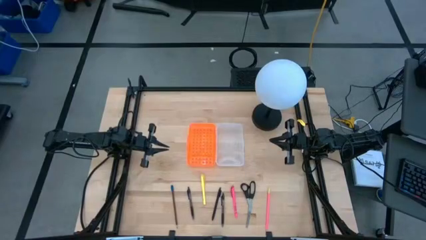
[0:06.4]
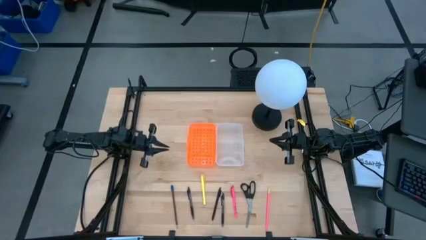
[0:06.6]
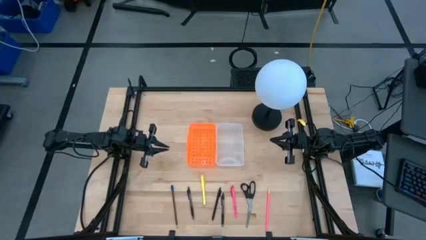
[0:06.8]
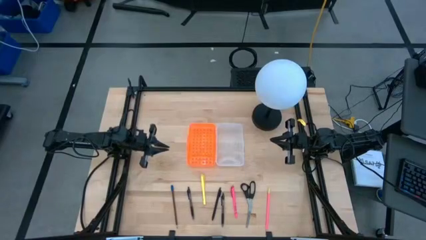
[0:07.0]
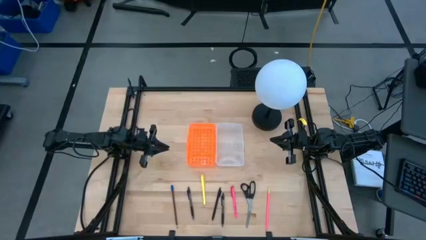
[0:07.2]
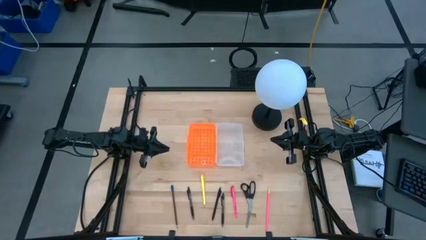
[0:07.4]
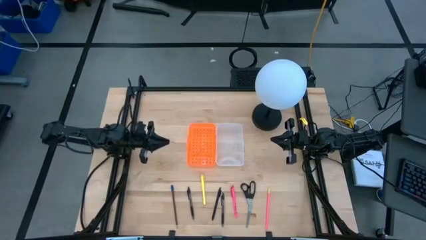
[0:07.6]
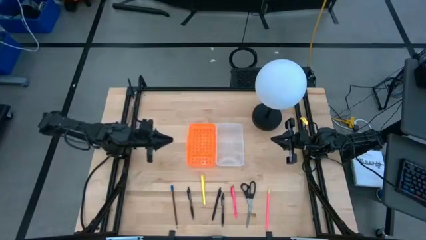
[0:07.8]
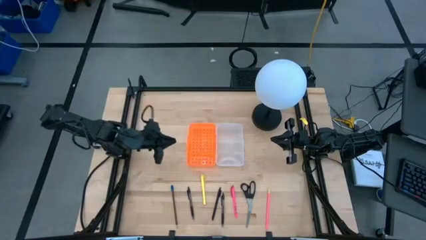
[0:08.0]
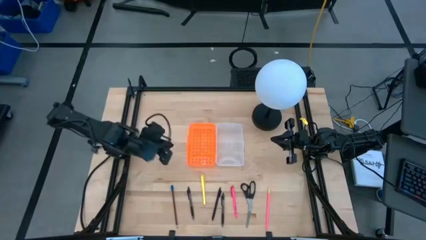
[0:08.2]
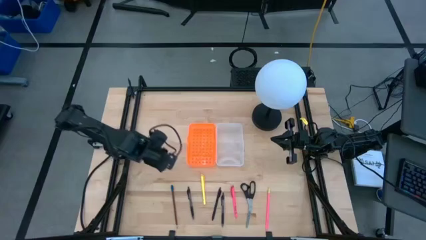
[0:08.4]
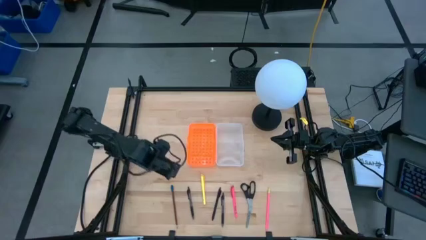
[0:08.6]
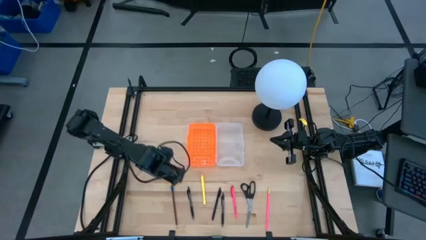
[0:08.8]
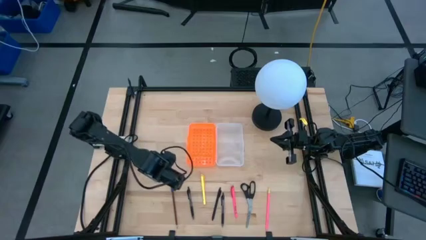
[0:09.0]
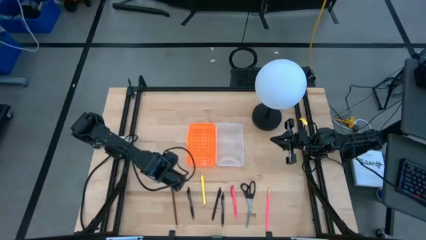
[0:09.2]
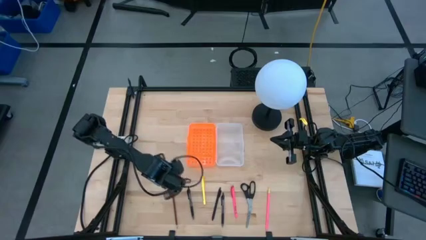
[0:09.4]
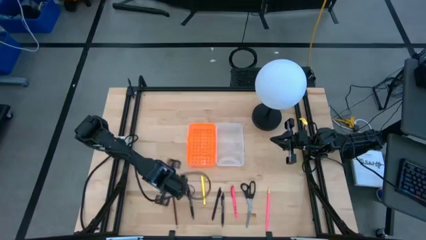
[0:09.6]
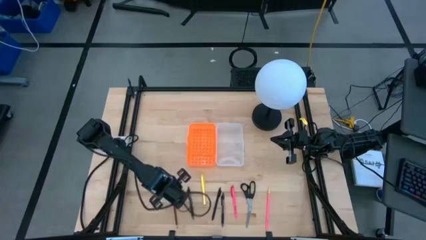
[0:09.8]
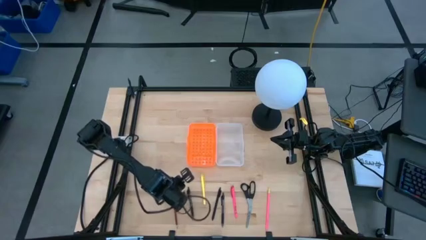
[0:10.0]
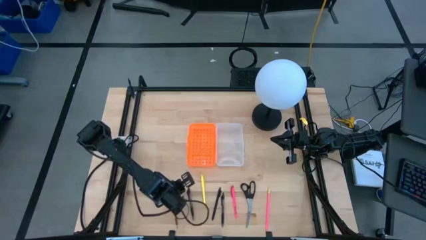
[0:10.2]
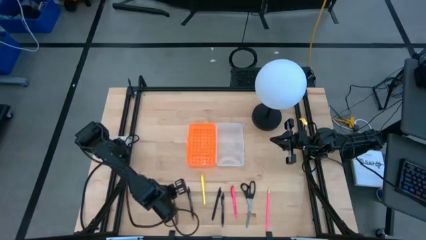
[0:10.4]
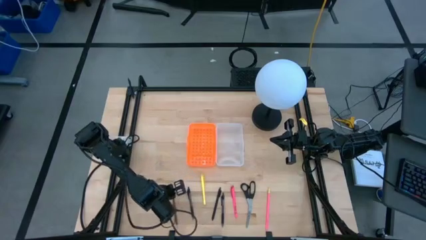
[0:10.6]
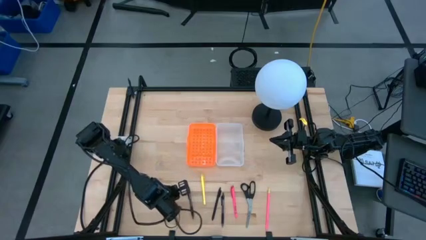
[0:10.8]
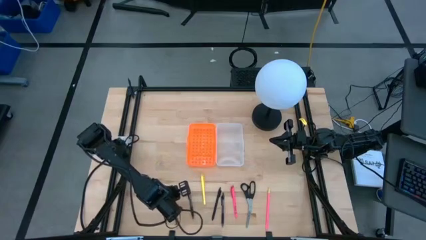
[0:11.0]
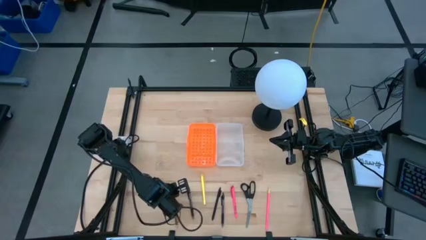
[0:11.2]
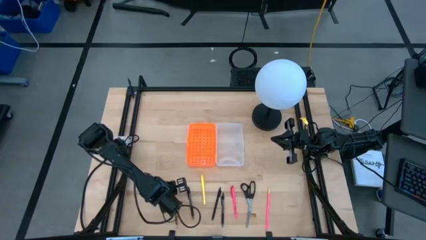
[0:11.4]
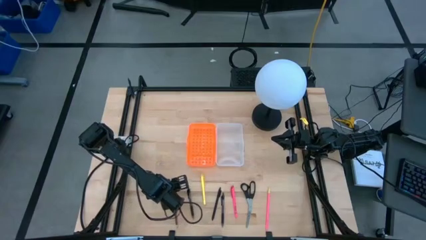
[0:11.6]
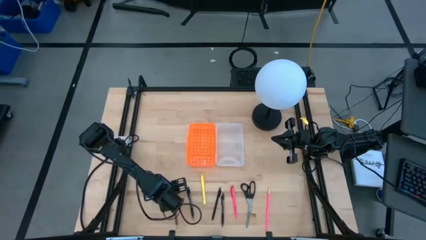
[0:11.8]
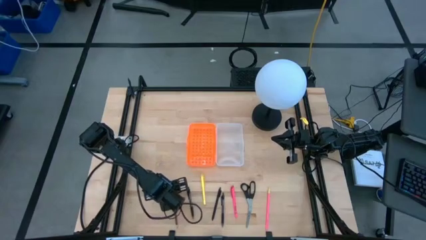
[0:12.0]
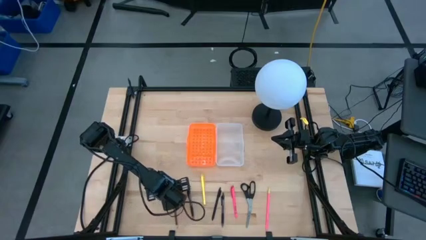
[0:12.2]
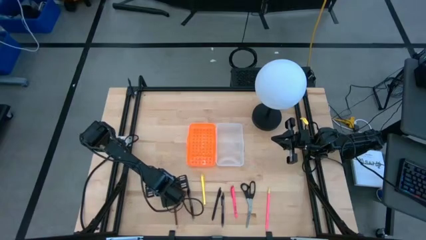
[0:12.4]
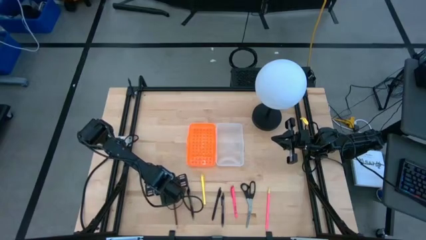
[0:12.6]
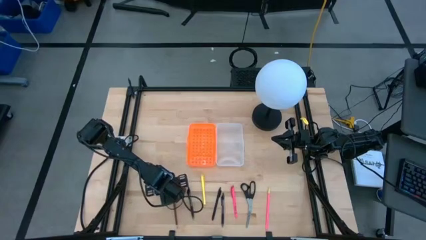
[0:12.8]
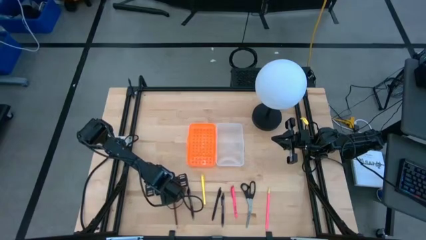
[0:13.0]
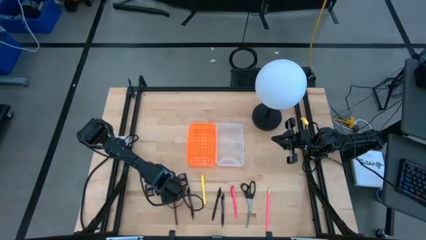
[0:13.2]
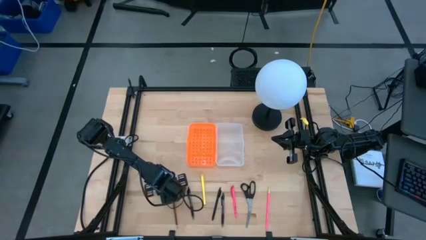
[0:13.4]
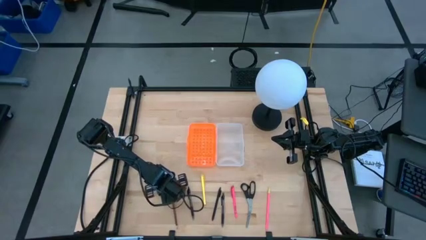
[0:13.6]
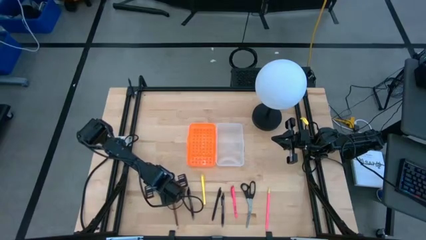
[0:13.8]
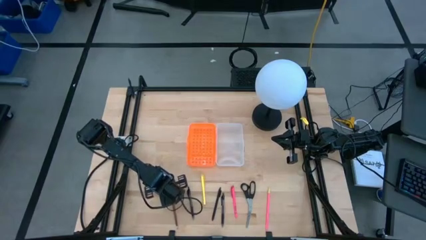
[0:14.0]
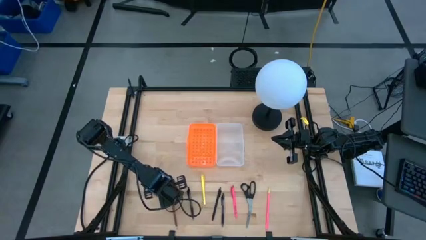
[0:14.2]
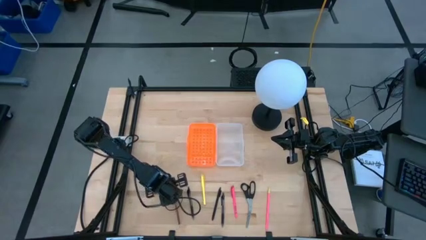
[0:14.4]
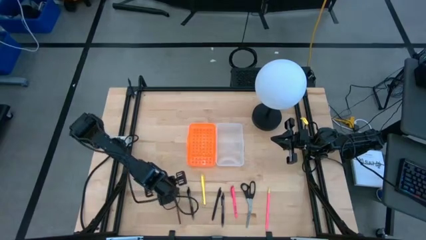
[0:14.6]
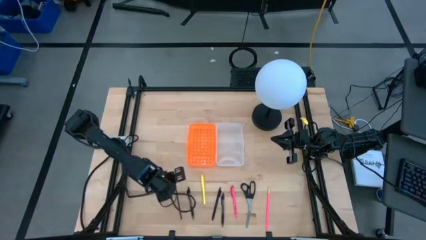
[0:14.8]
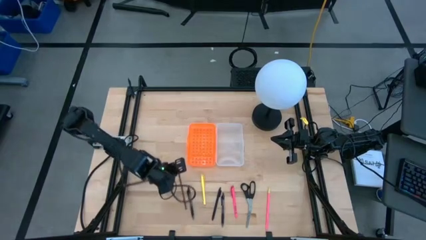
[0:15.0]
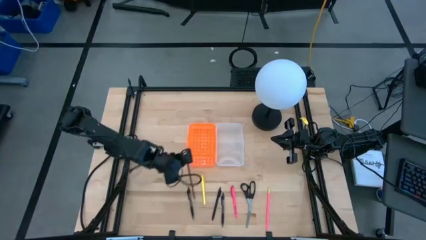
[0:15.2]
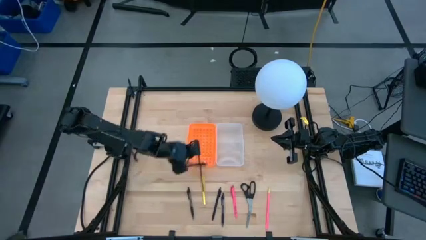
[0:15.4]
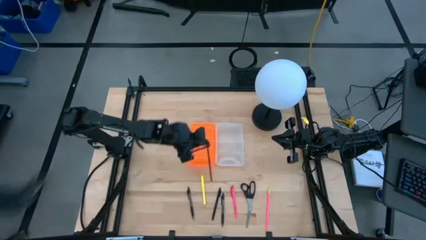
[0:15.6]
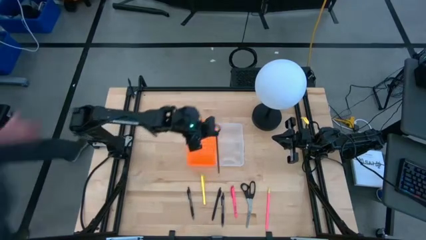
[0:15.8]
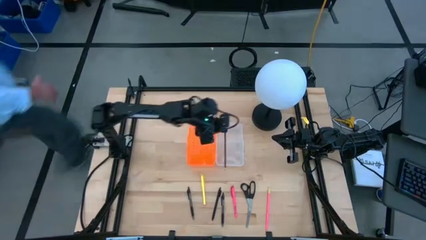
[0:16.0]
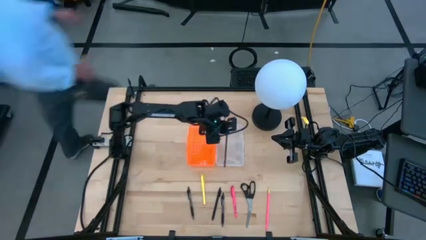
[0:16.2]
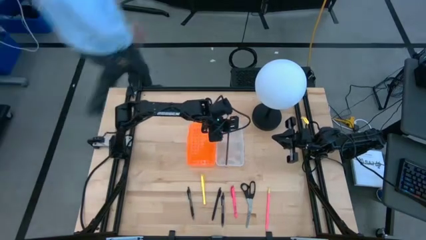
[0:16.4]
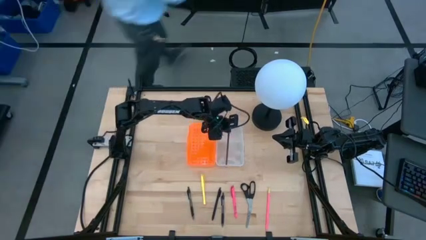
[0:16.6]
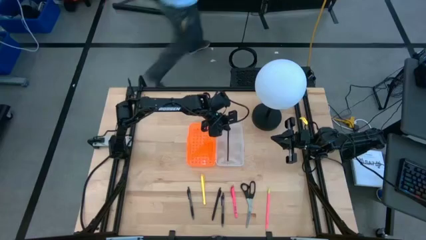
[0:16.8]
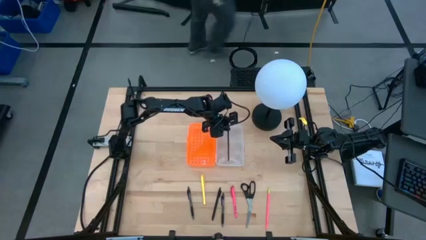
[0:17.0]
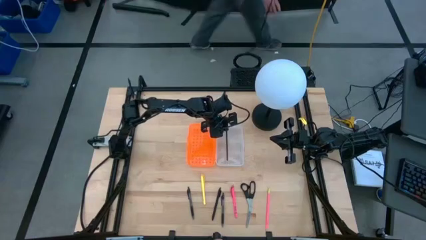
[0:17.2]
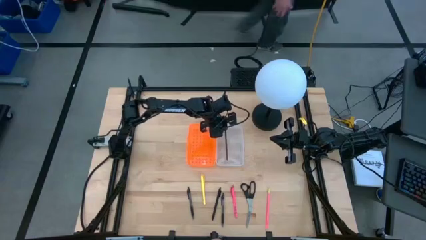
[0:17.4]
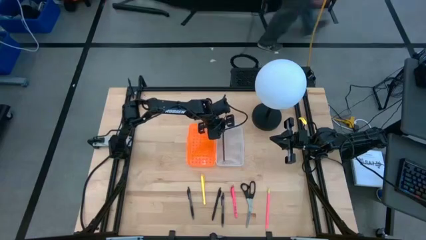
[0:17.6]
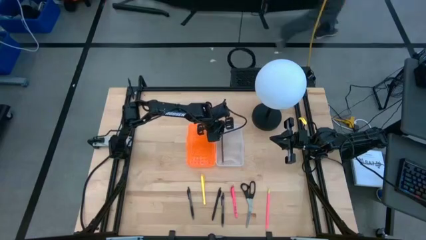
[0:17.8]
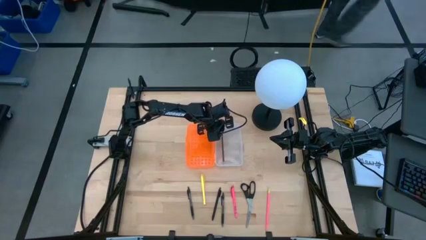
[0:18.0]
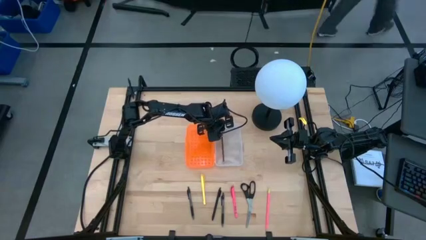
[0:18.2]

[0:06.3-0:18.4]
Task: Pick & place school supplies into a supply box
Put the brown pencil into the orange supply box
